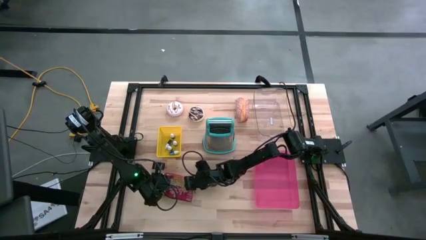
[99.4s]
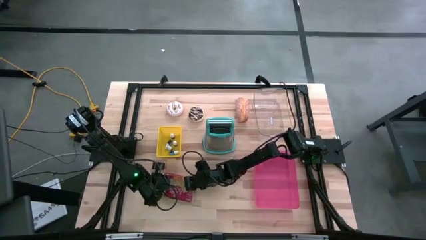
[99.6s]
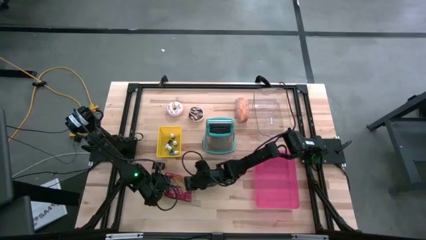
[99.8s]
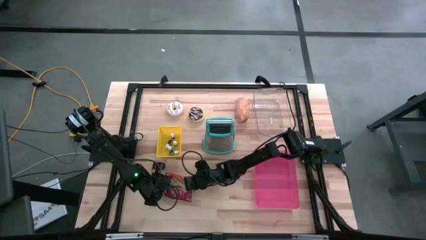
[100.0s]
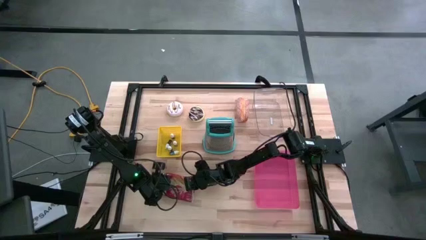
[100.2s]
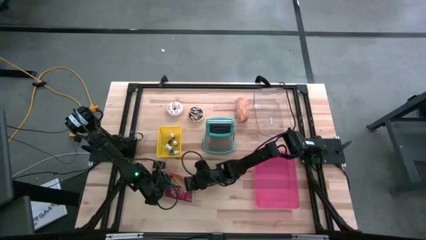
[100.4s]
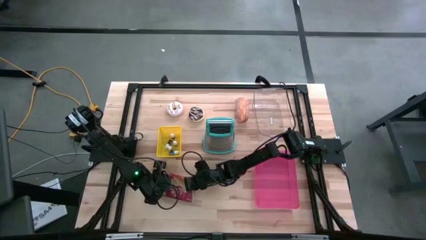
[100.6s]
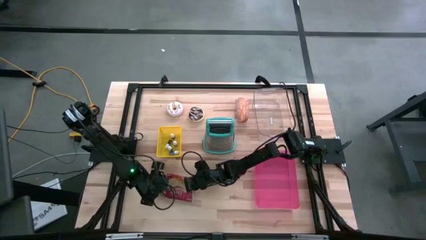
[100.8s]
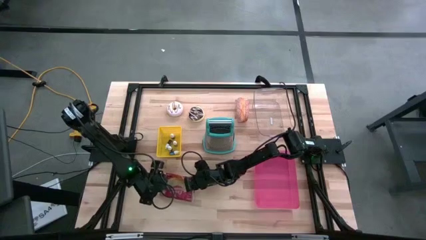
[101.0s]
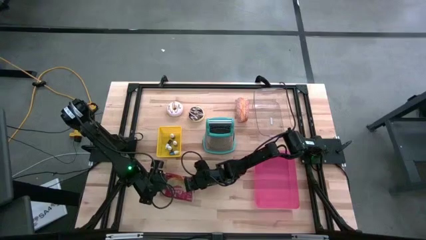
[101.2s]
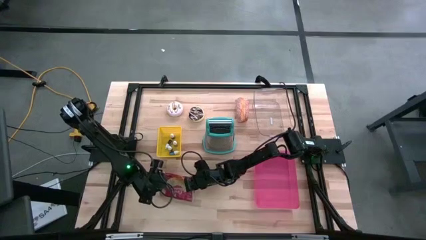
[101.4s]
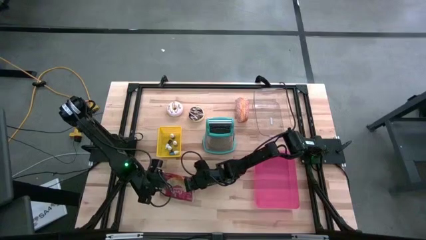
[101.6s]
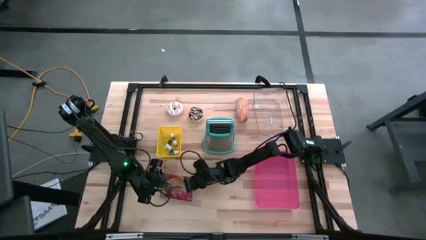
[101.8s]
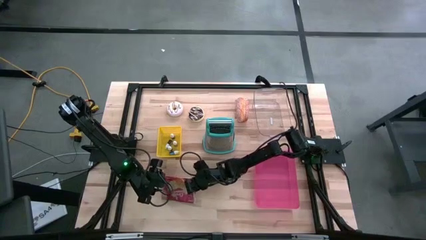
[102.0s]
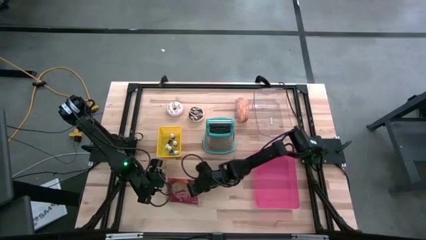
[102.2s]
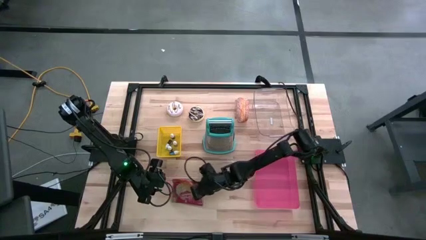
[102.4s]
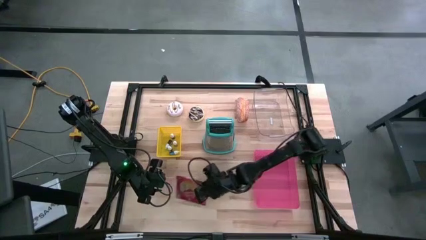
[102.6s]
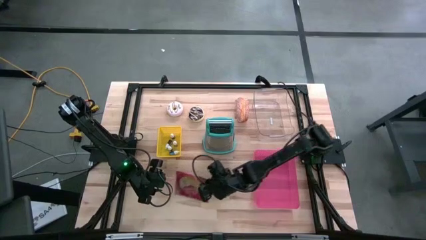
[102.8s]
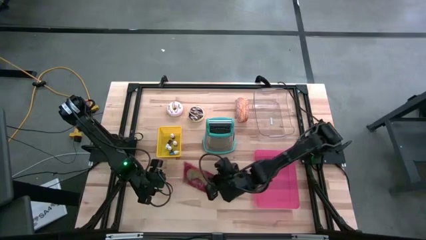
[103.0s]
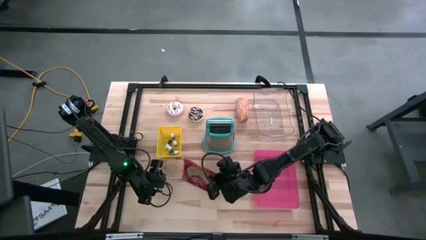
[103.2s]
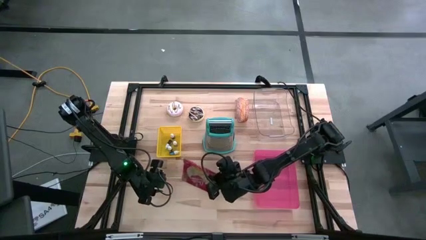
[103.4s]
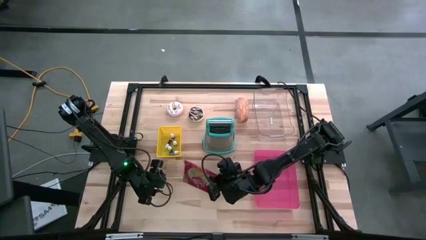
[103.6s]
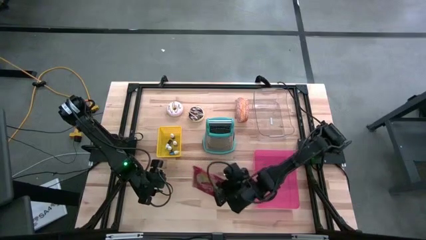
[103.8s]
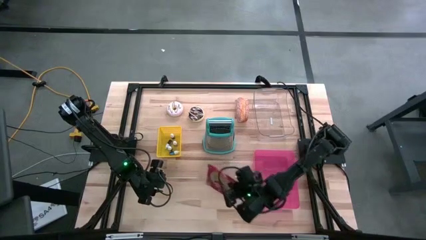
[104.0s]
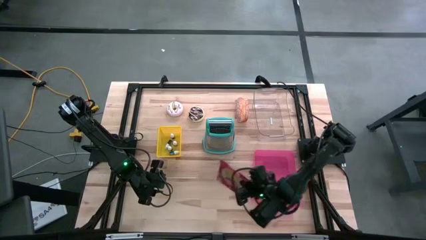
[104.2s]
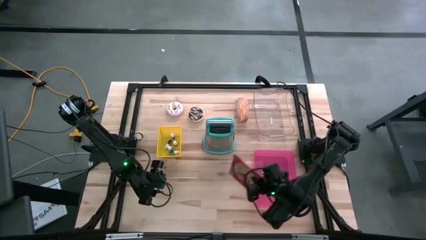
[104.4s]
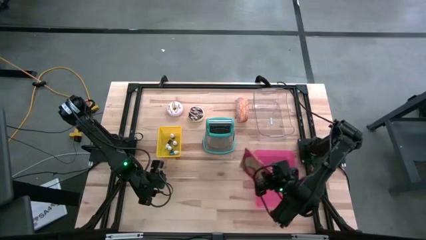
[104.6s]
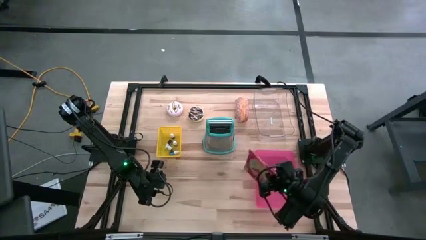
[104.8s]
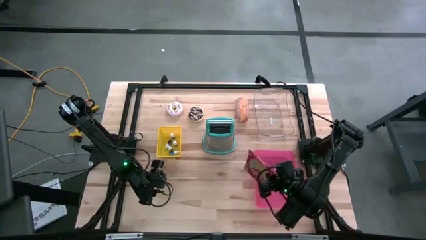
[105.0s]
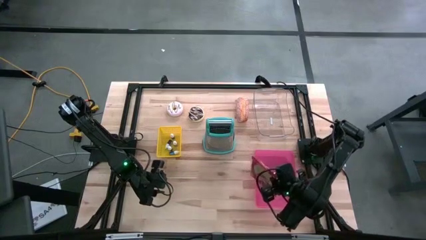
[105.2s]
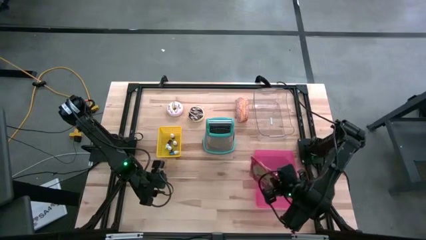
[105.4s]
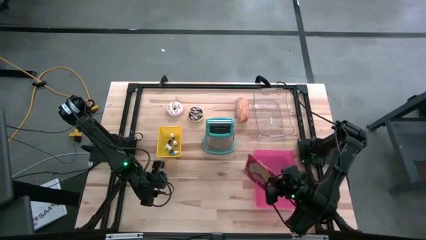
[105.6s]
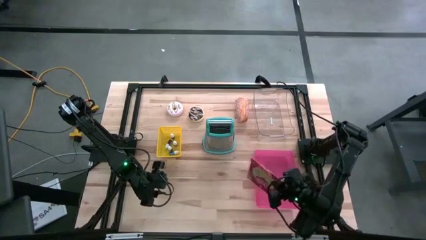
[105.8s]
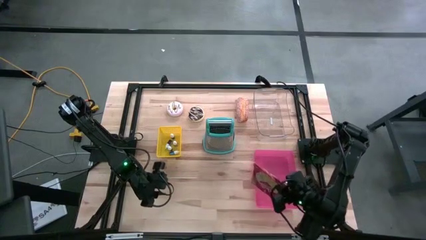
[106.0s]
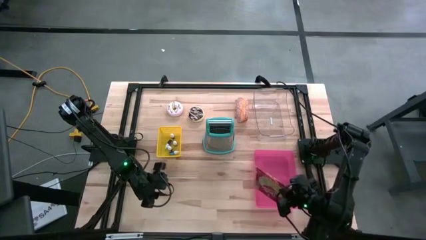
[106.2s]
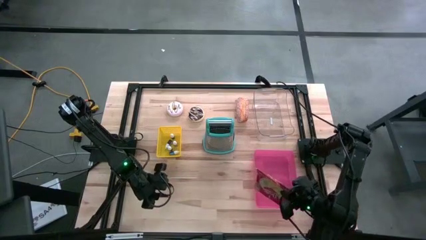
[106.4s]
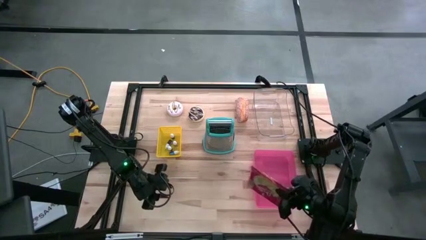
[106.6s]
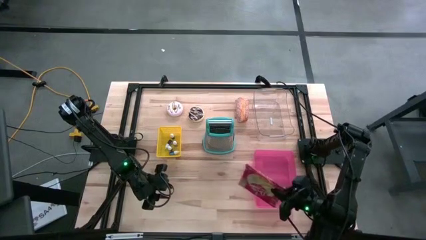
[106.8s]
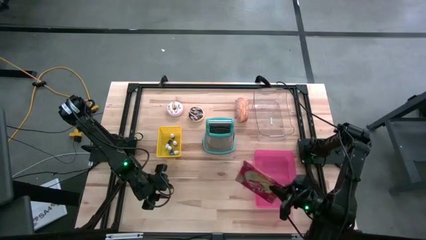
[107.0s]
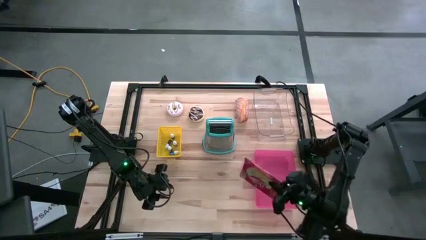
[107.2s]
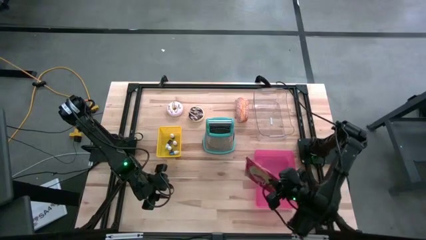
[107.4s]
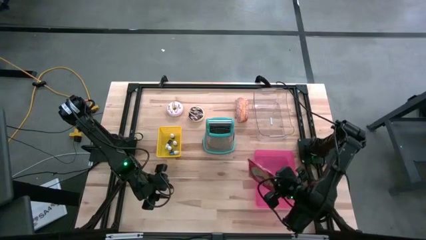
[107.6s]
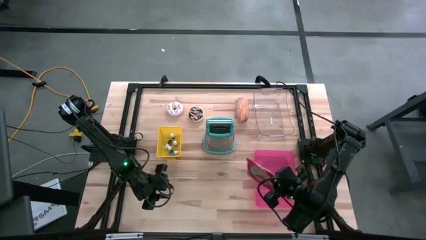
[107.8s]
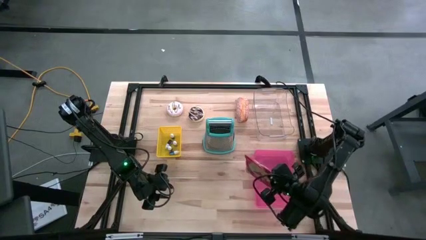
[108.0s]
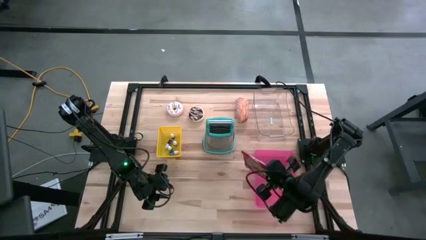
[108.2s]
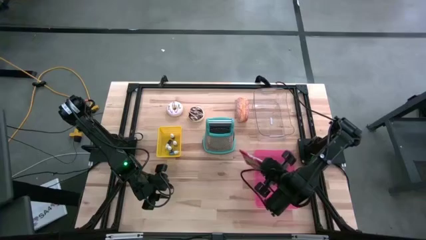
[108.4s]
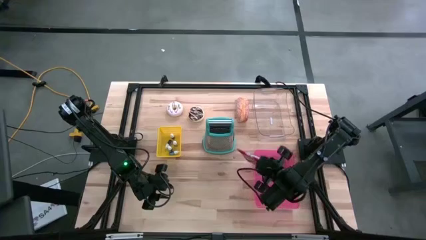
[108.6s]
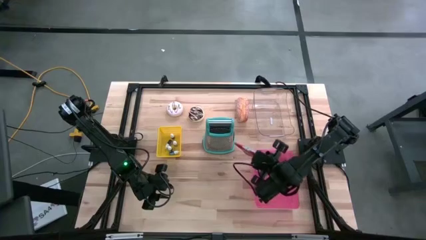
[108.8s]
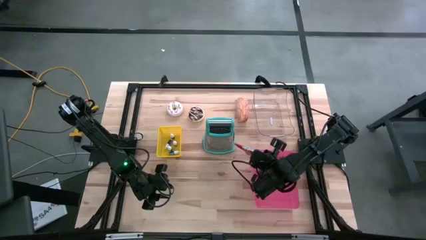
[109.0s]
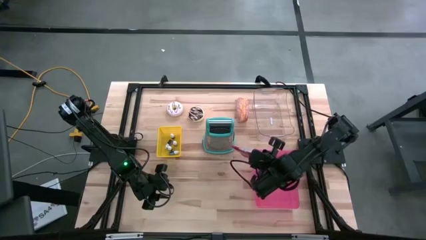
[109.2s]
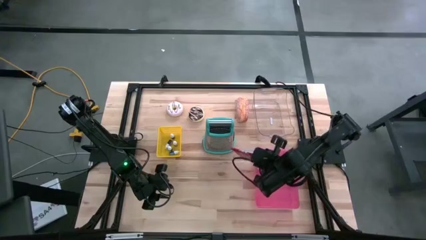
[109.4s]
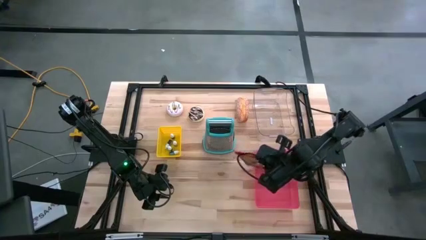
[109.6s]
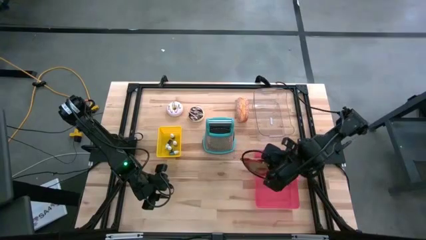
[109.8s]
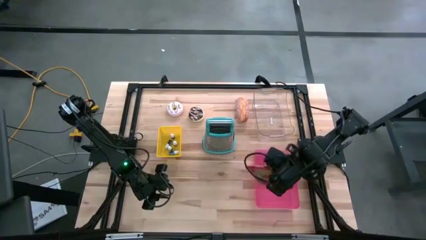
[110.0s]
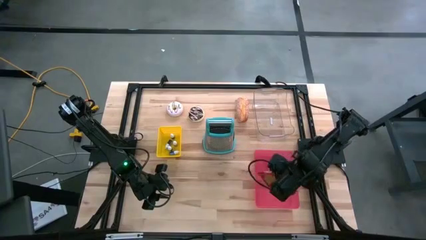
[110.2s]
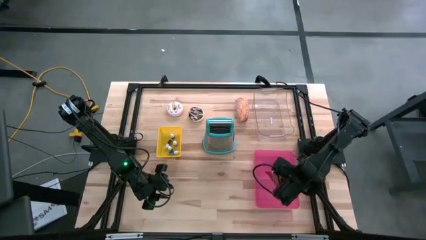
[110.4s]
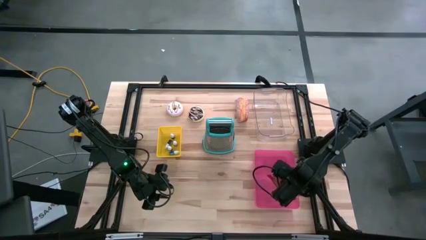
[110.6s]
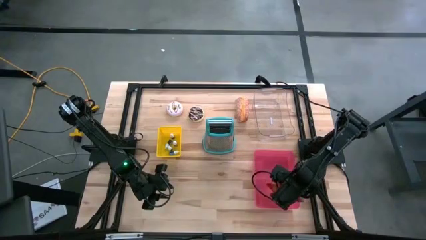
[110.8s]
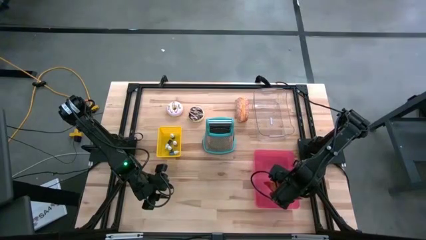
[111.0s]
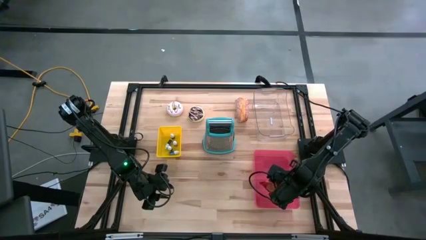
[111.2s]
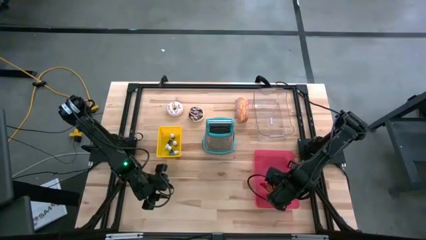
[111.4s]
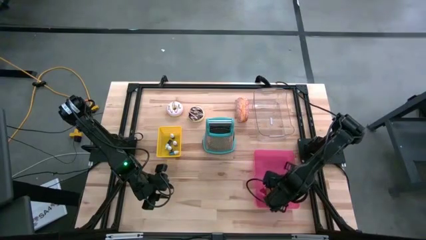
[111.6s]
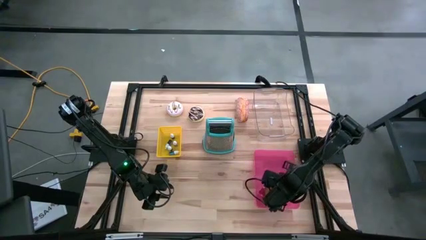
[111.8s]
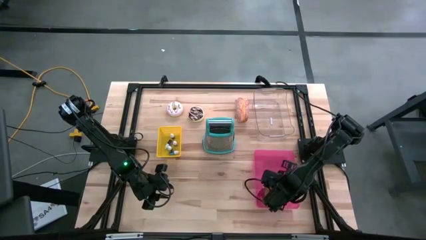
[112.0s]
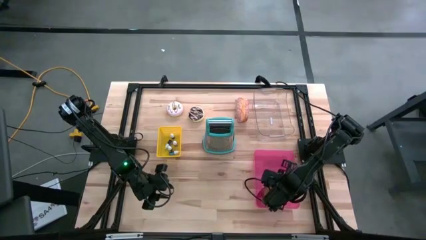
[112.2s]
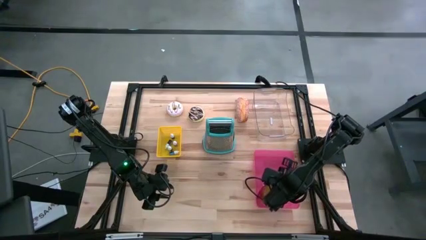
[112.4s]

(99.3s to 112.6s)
Put the popcorn bag into the pink bin
